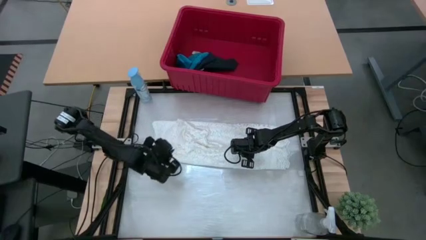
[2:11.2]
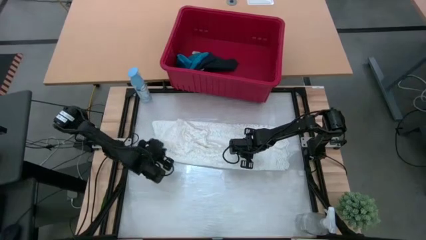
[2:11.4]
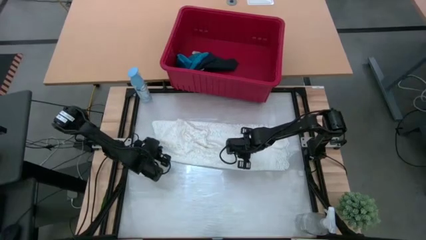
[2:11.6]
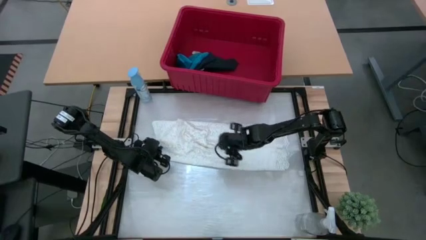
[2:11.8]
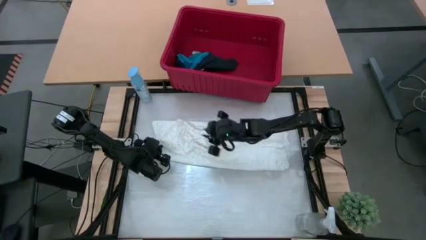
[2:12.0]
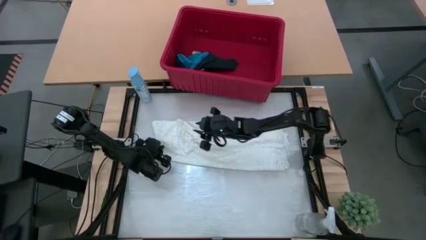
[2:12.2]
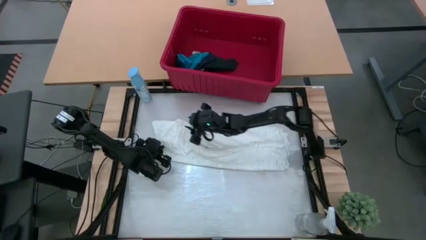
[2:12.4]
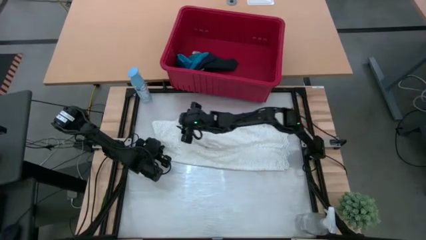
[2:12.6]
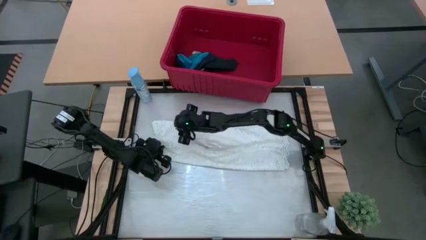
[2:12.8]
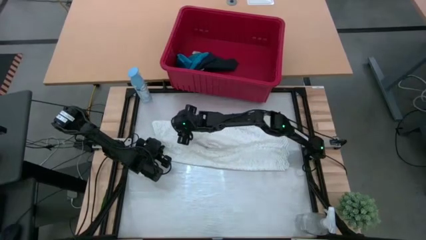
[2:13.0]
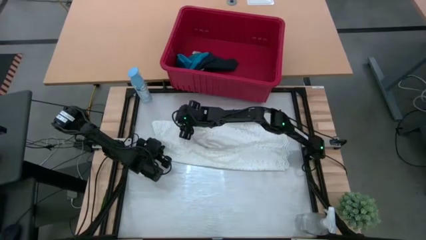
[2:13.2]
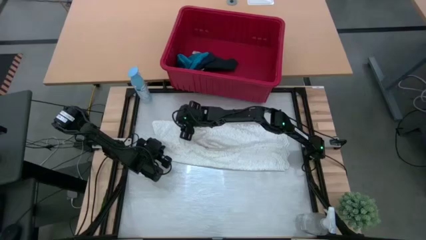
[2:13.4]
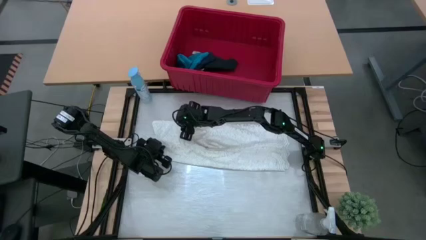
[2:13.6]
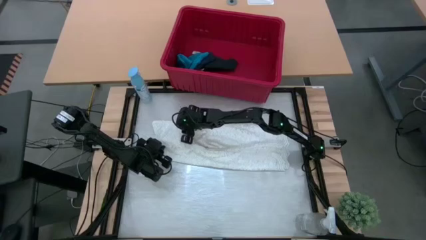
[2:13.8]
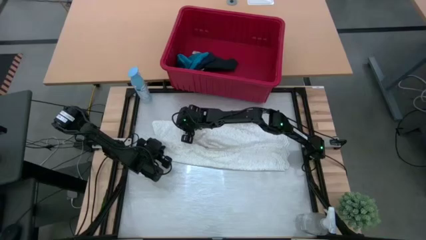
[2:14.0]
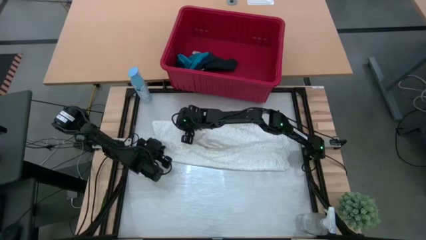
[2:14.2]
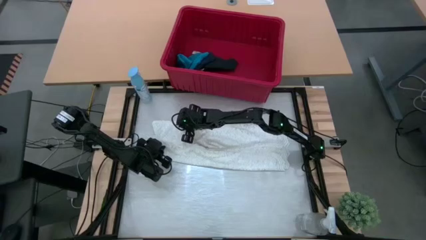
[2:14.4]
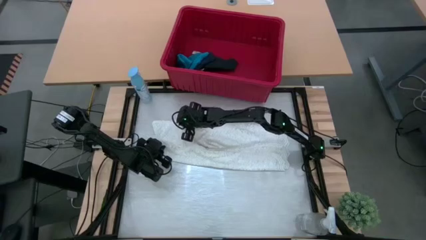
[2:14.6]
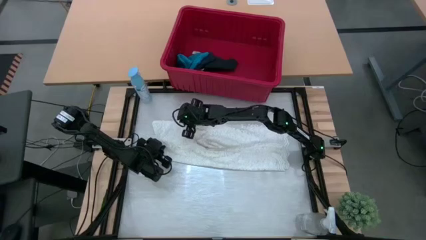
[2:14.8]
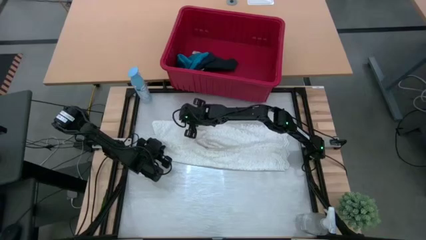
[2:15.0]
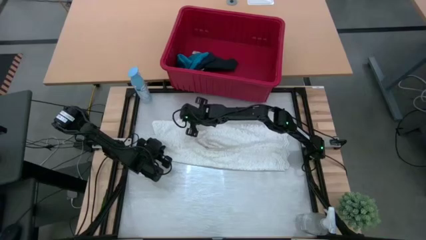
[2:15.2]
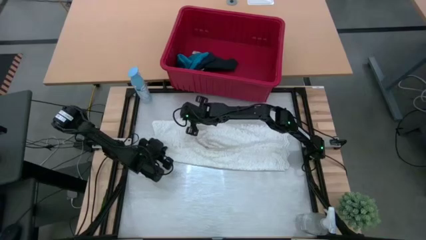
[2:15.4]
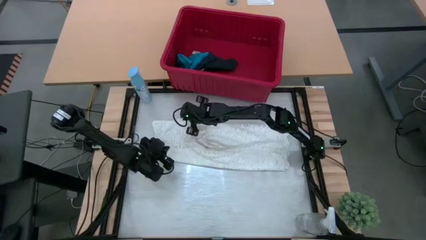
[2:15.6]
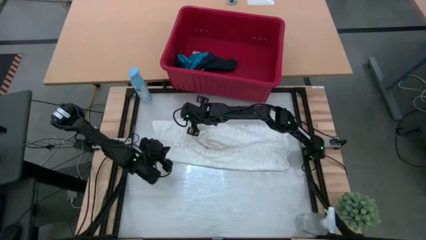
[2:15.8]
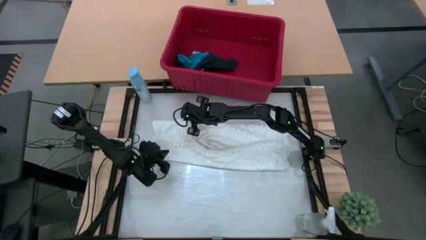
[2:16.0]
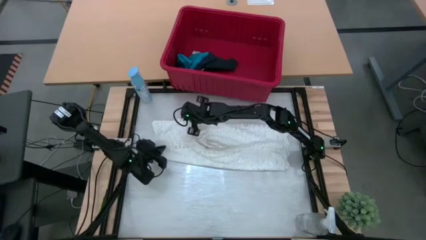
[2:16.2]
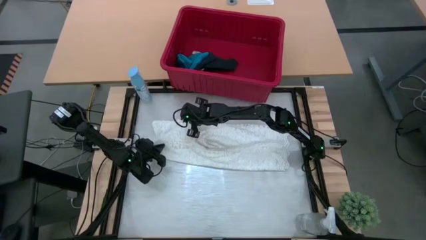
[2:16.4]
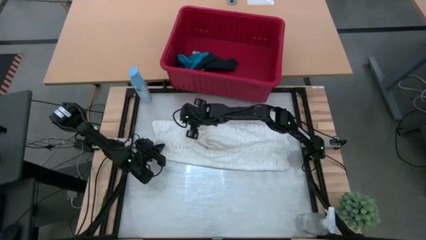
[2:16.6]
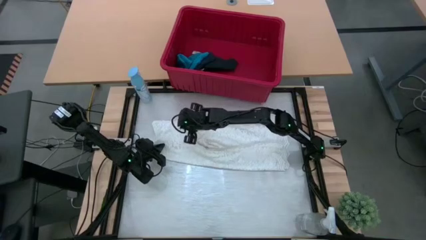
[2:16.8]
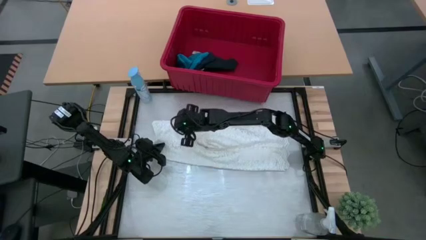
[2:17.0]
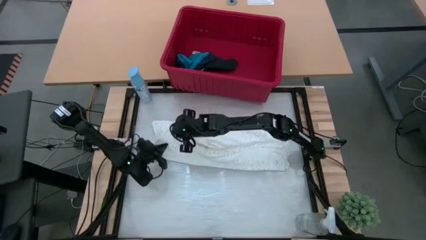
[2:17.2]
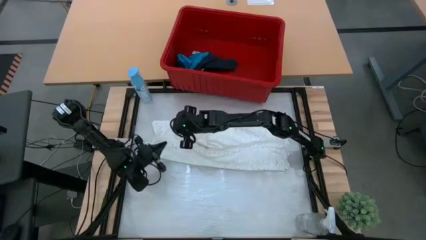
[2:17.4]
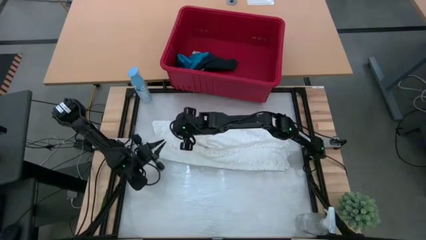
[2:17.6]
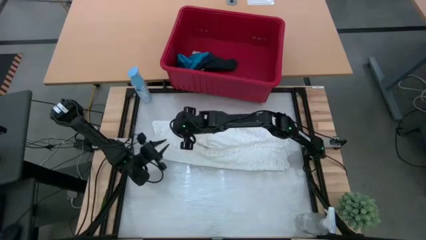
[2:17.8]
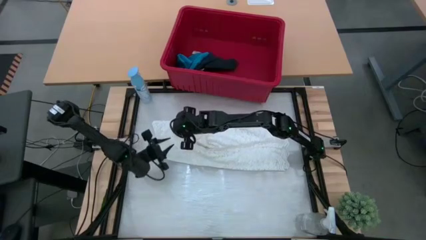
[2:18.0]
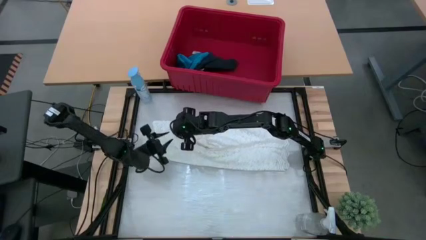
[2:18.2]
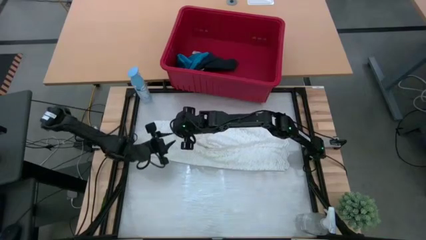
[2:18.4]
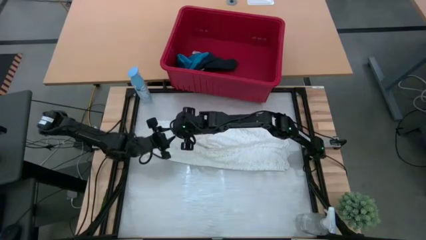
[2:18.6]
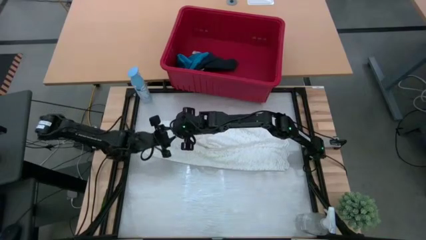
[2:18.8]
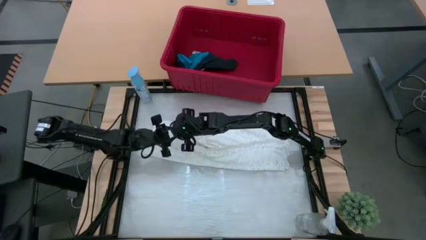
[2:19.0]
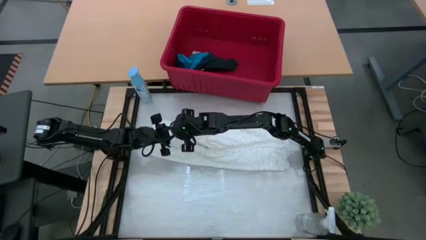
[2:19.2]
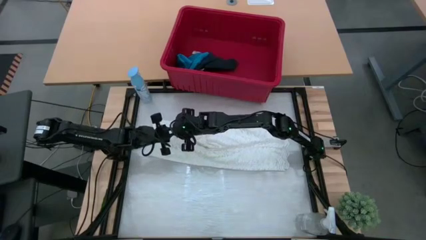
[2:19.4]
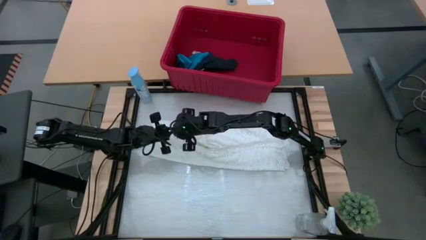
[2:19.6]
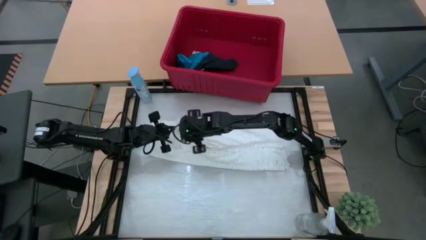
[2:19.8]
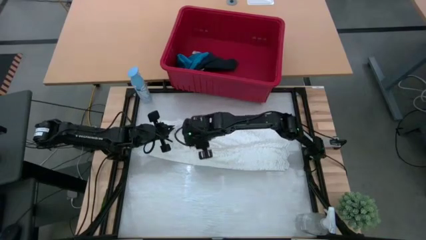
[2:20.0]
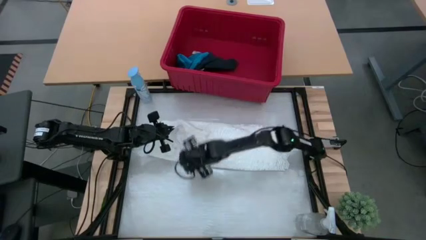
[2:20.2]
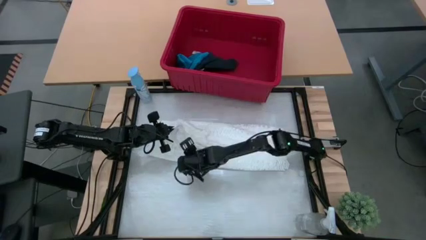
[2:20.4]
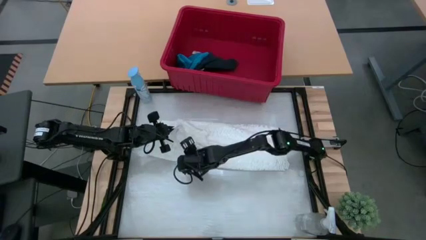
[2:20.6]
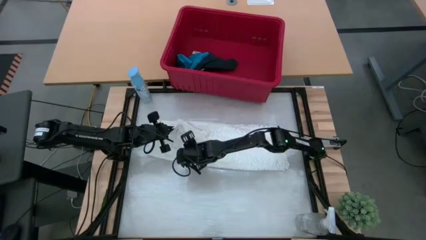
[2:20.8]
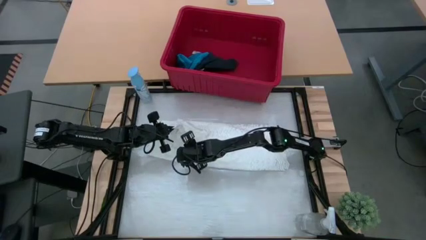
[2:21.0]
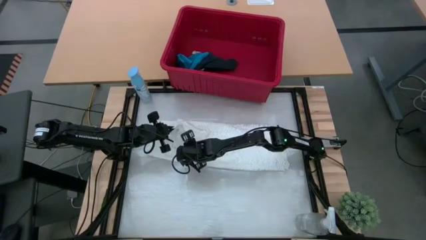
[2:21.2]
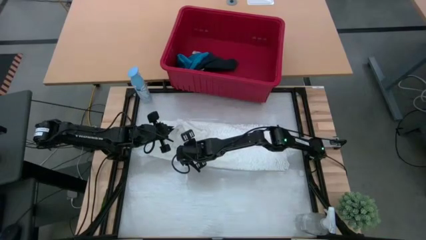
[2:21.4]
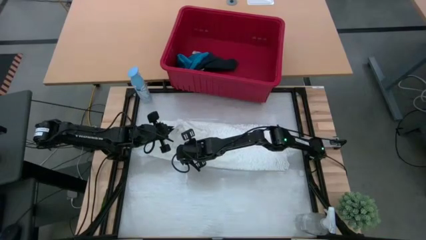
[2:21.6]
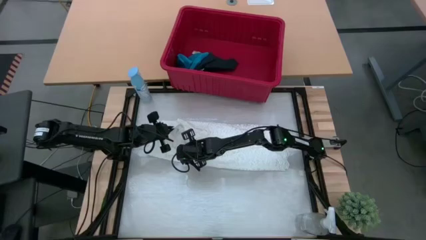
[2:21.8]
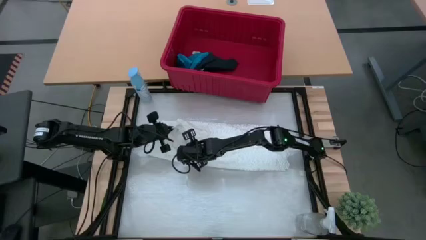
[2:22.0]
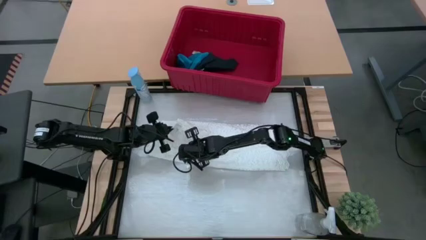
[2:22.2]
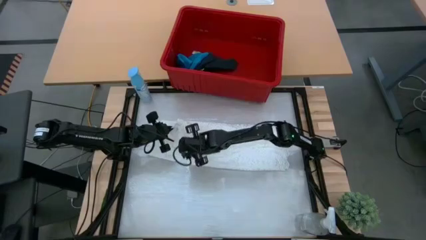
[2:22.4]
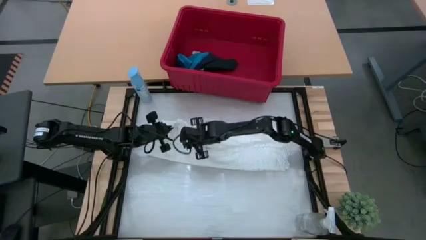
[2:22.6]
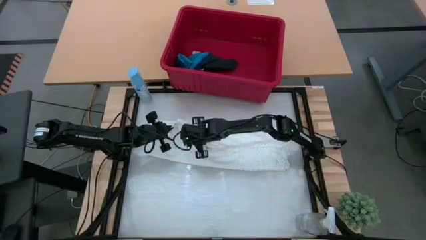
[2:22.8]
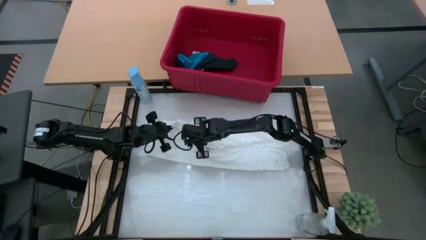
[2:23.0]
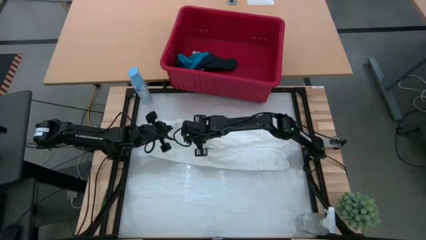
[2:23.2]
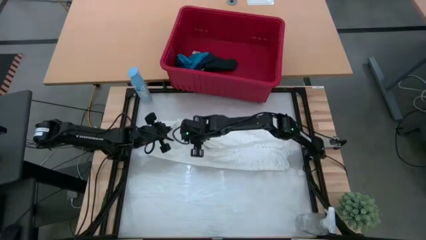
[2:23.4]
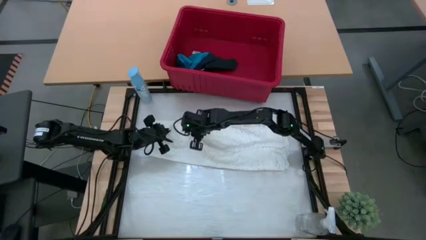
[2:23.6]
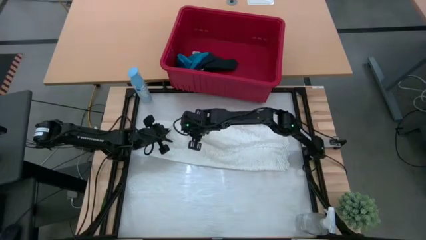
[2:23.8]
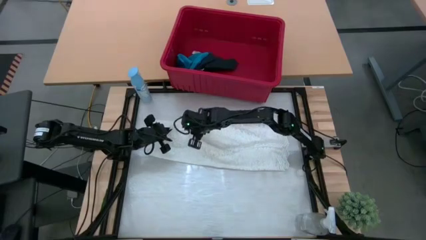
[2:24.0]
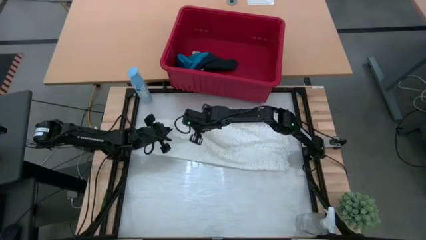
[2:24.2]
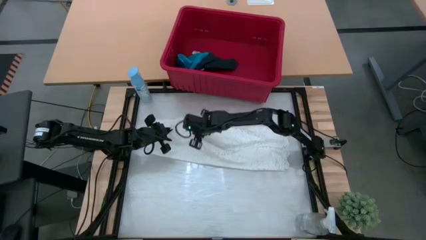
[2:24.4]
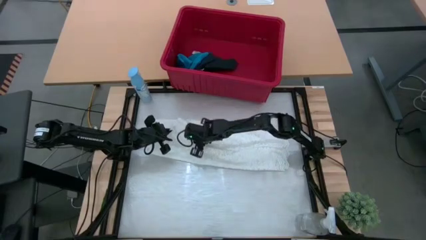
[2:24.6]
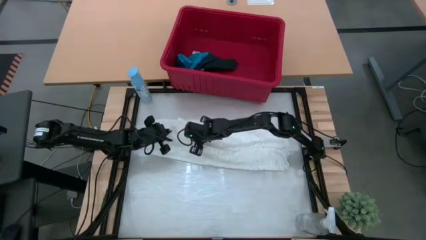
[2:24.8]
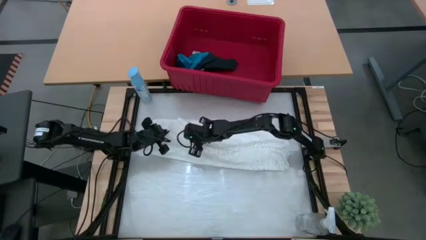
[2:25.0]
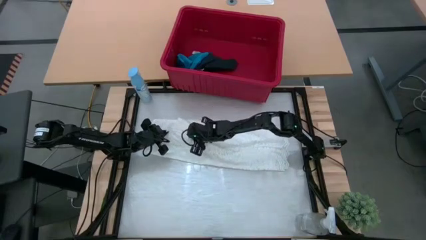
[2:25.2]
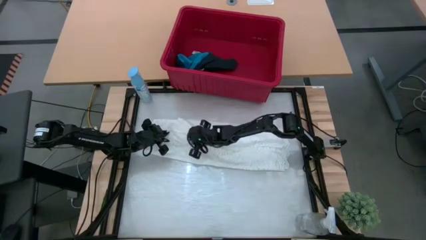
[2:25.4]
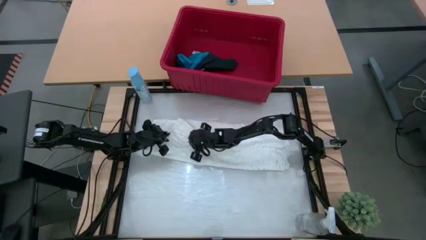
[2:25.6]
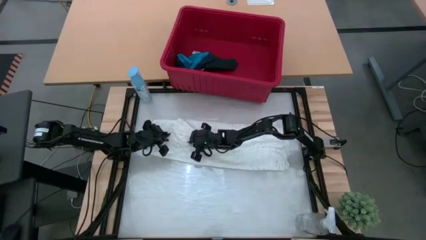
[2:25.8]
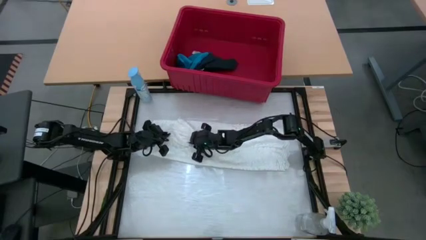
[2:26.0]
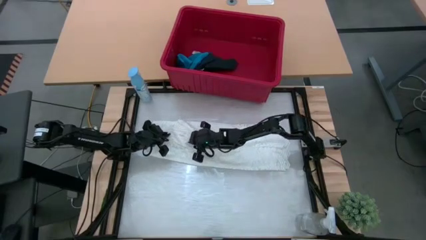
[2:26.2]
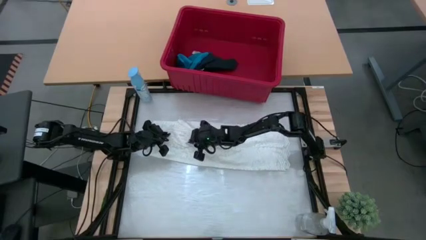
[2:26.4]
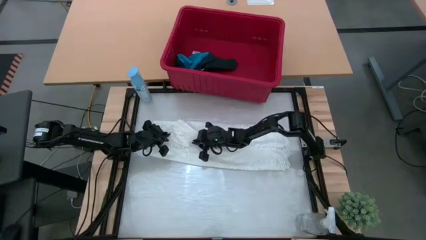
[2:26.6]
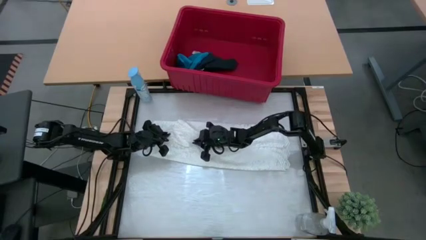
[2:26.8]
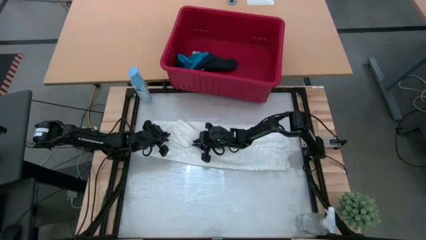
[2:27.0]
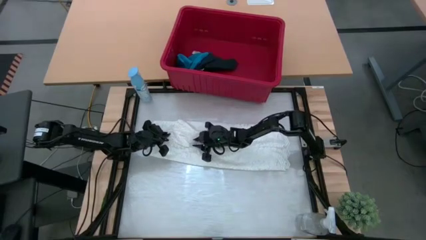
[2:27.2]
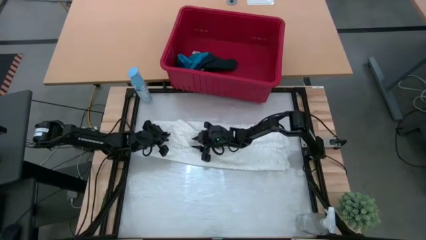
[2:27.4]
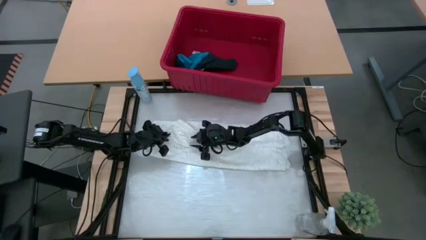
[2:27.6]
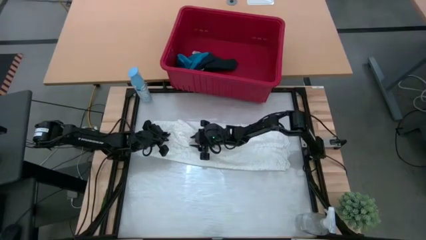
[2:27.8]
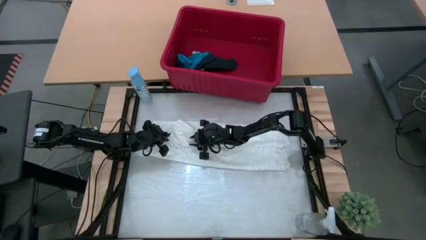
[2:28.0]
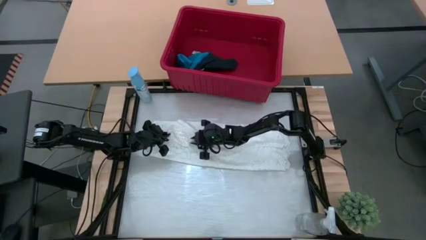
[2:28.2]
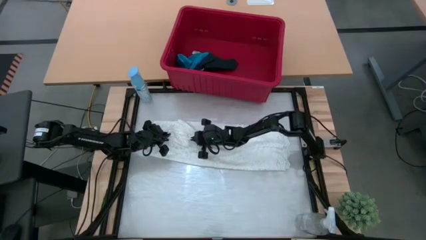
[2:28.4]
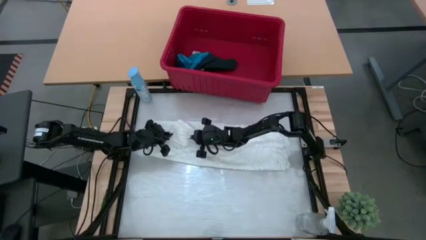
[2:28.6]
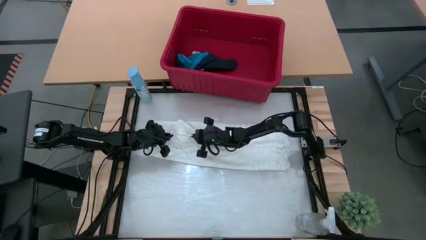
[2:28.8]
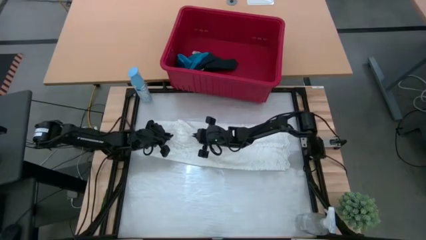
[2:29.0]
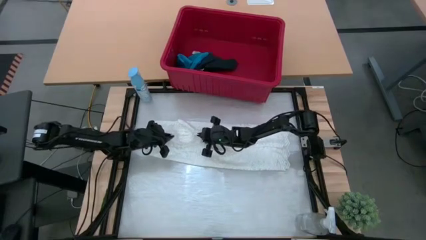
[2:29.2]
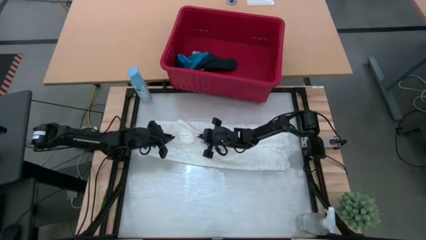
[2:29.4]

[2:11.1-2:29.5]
Task: Fold Laundry from Bin
Fold the white shirt
